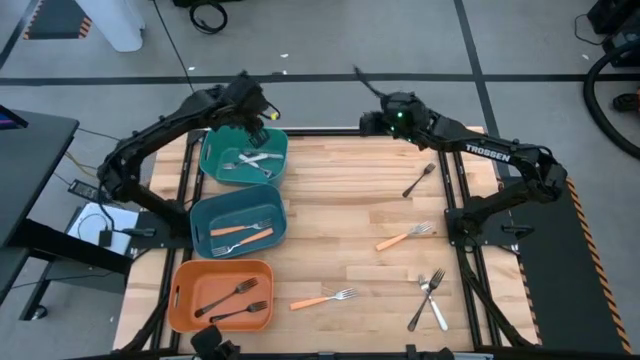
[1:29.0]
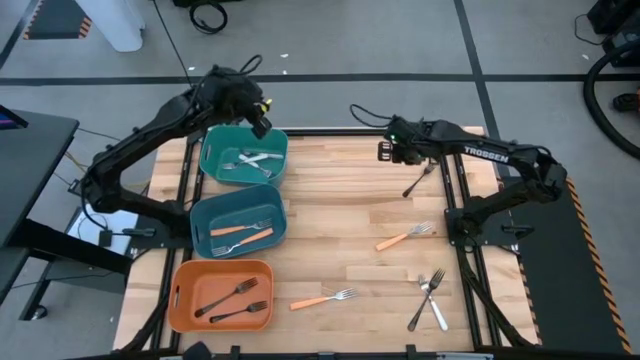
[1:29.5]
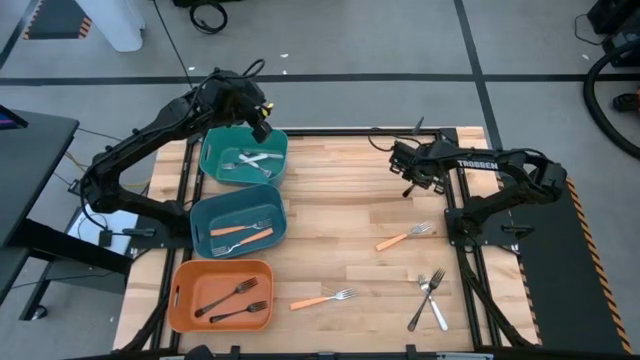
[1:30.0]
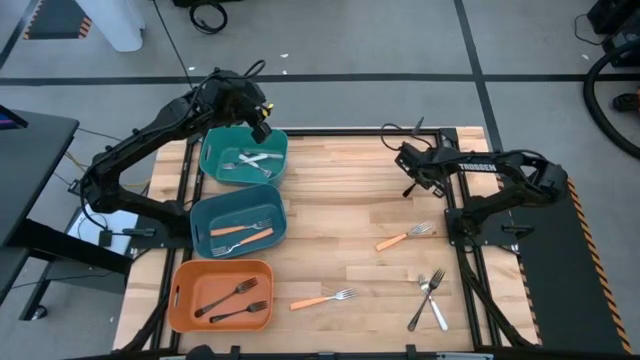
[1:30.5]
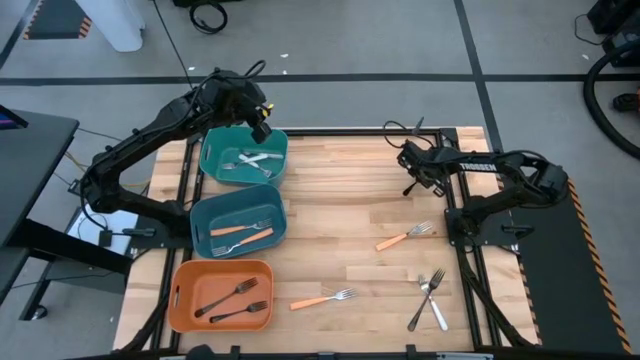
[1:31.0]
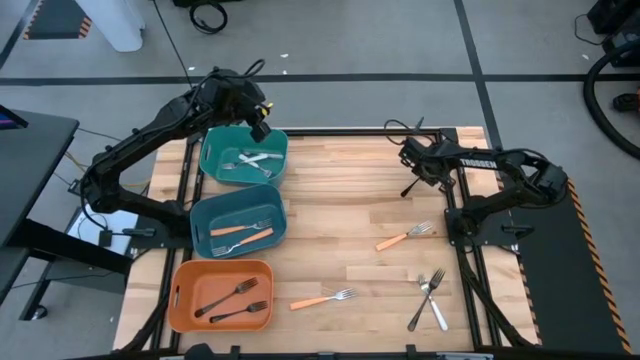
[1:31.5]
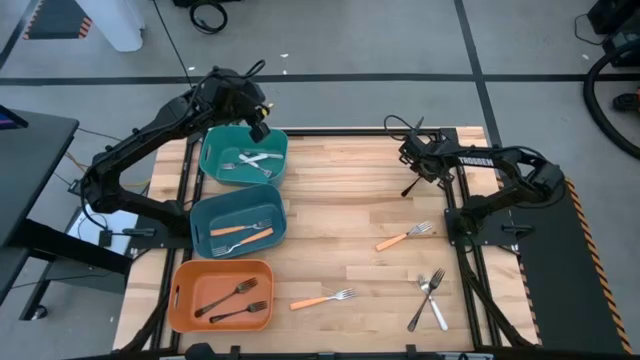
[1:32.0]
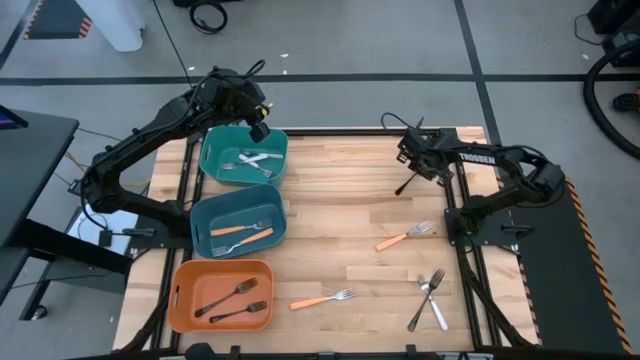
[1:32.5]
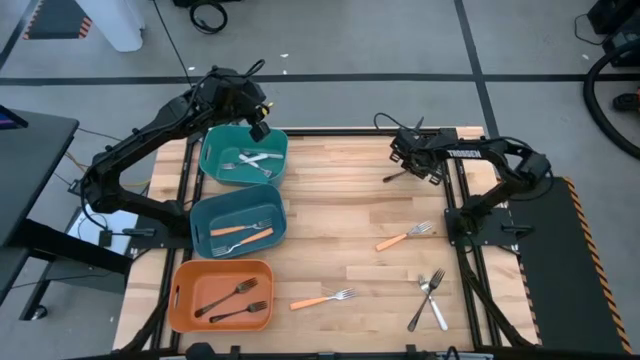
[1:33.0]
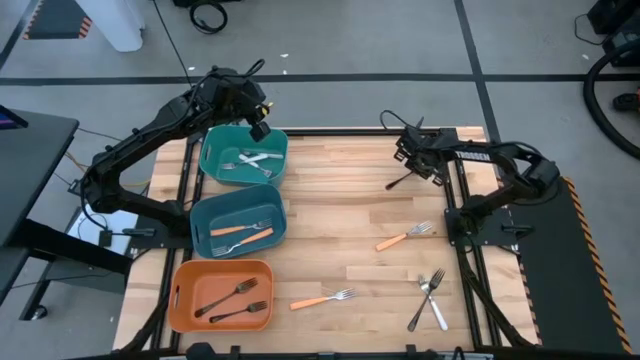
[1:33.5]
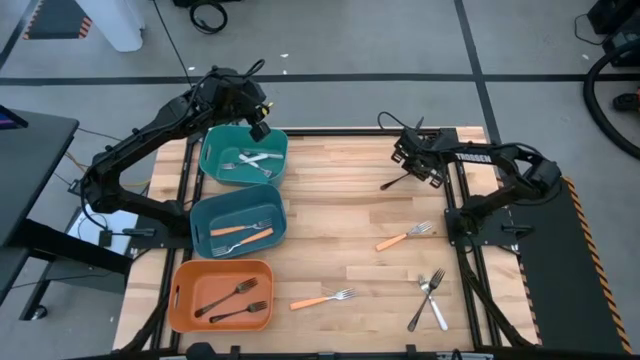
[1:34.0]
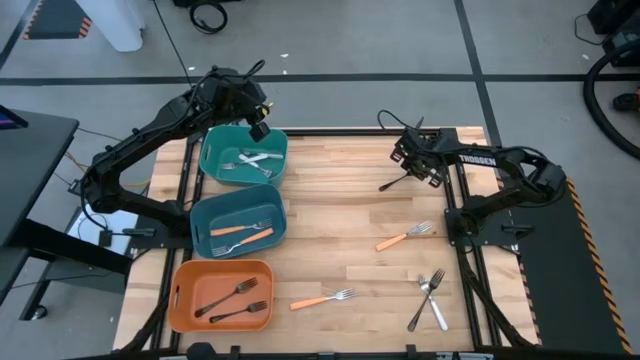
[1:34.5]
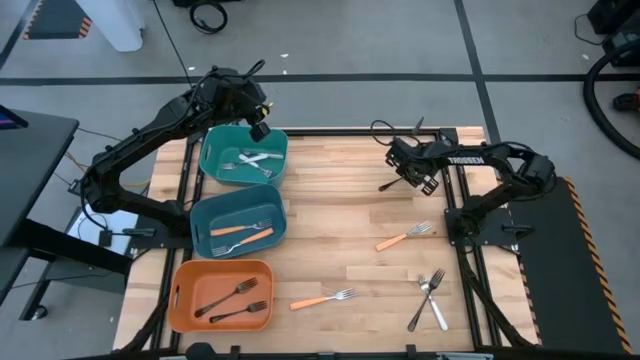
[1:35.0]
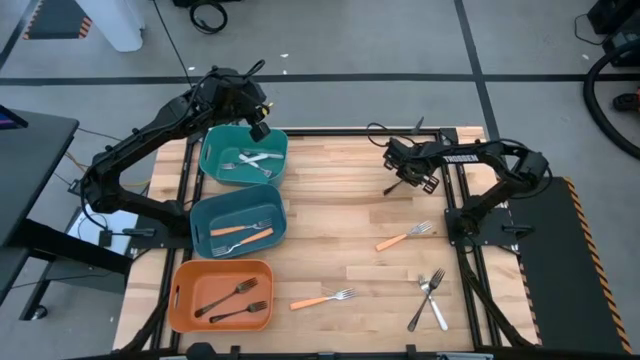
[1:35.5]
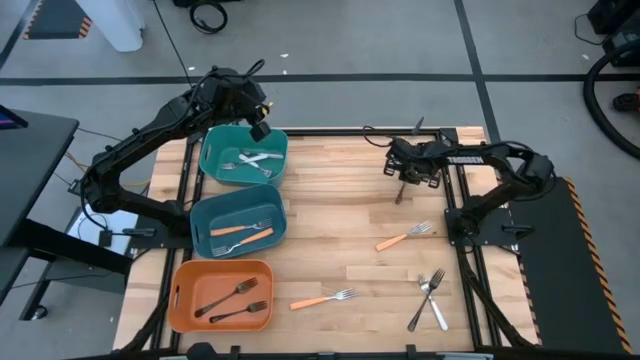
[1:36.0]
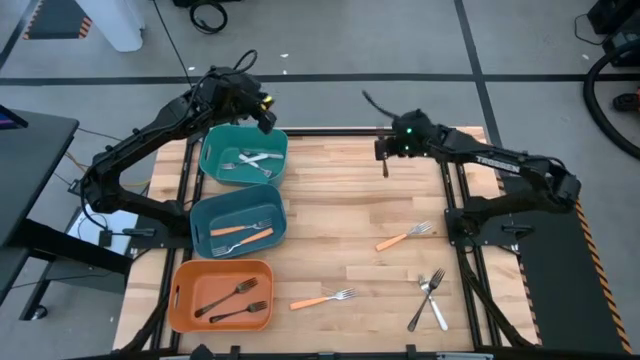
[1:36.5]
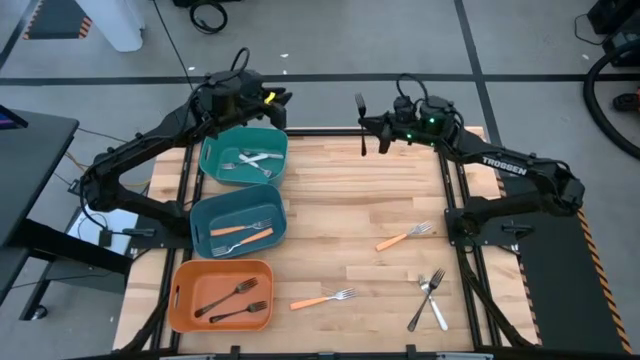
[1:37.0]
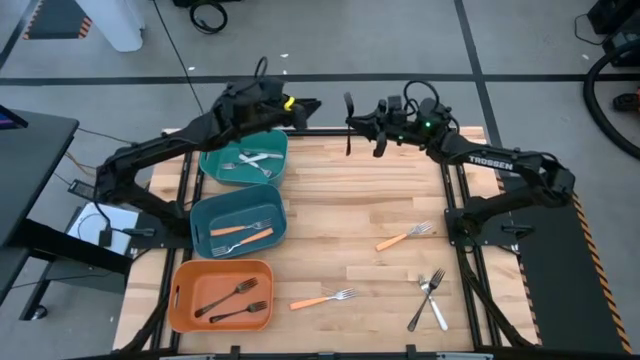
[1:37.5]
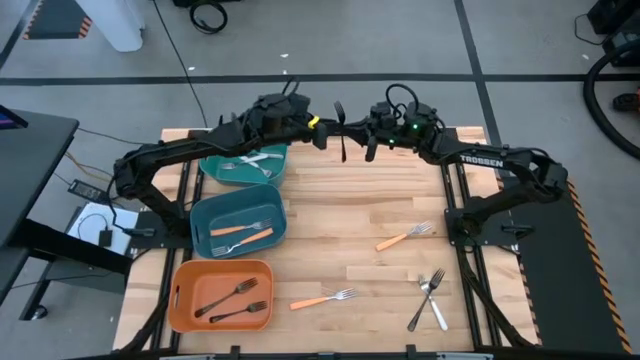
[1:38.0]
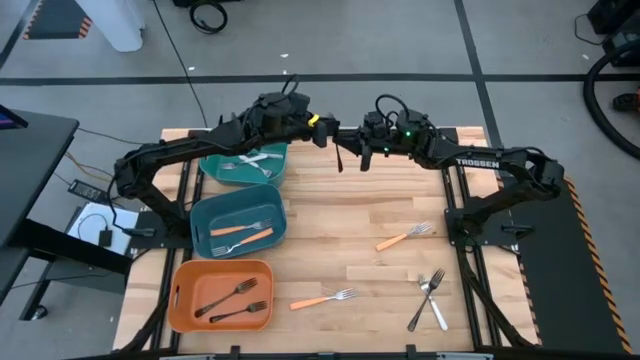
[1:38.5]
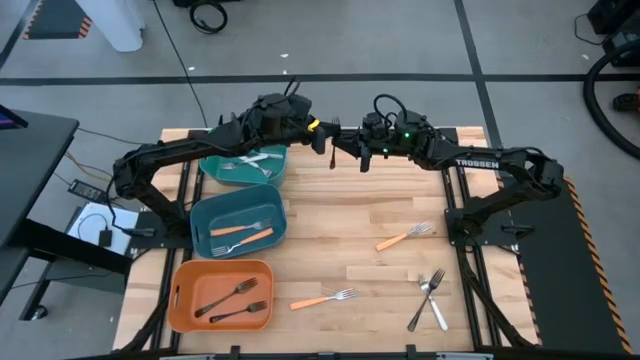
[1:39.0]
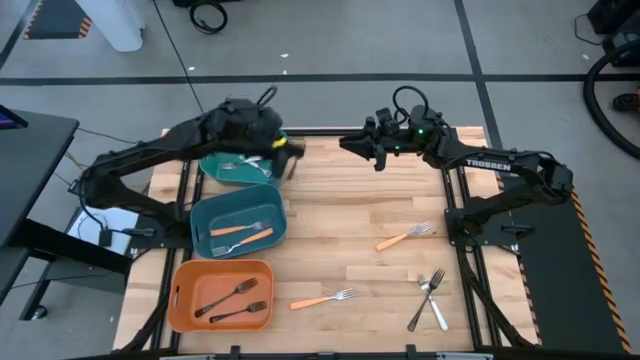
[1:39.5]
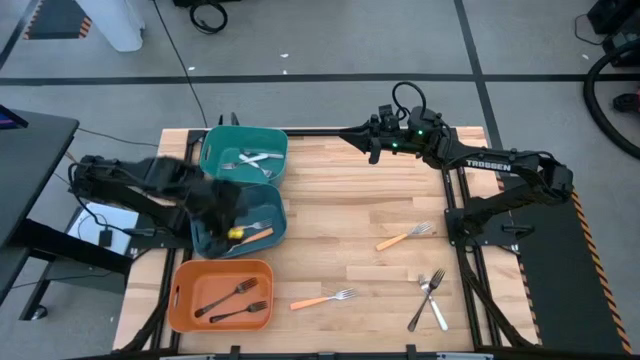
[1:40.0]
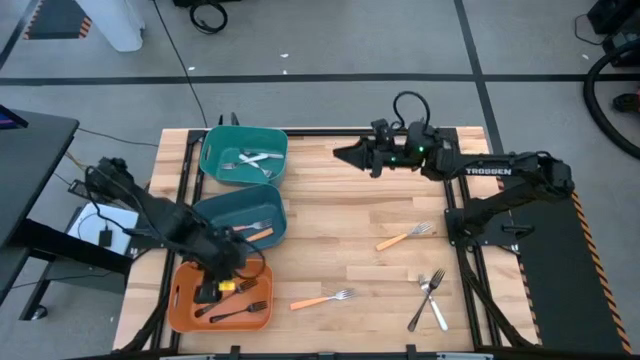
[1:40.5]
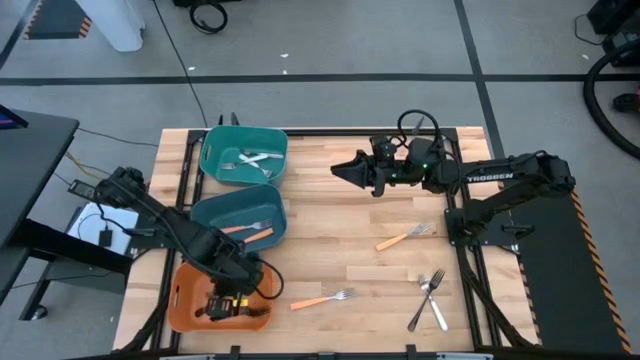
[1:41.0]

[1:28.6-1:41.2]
Task: Sort silverware by color (type)
Put the black fork into the orange bin

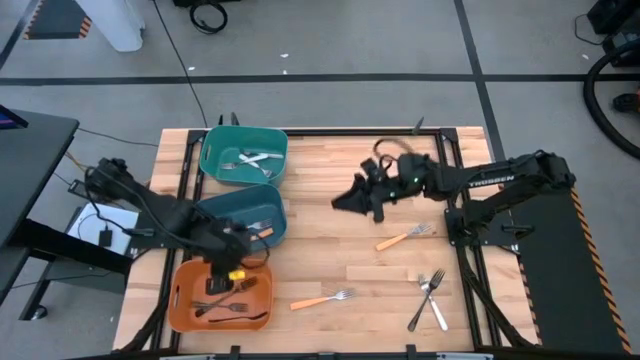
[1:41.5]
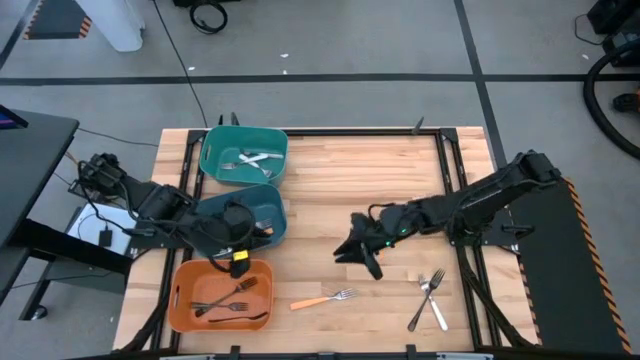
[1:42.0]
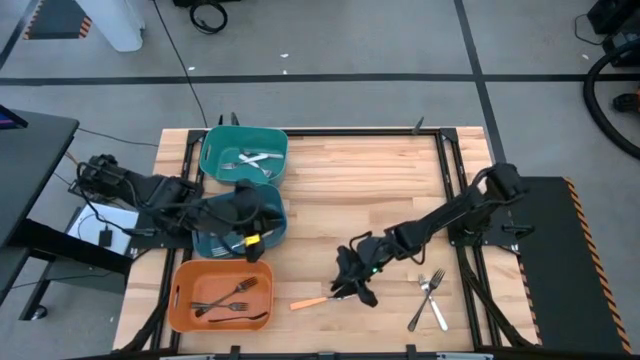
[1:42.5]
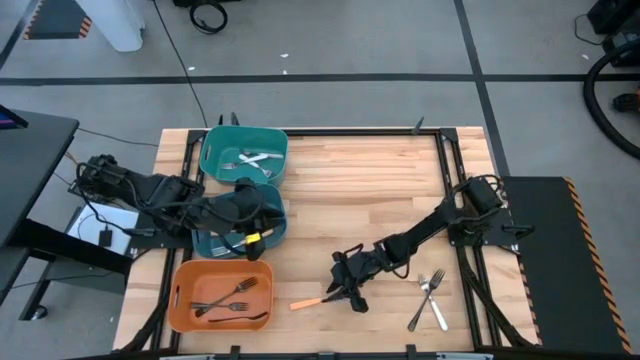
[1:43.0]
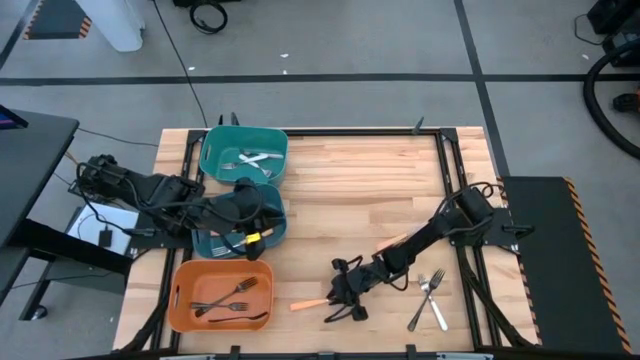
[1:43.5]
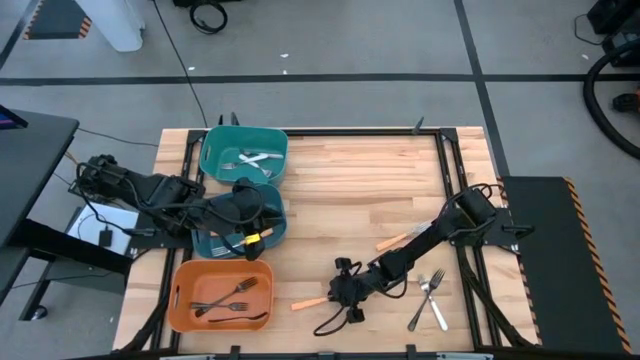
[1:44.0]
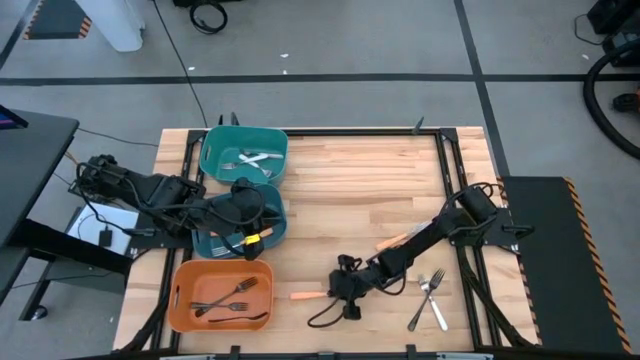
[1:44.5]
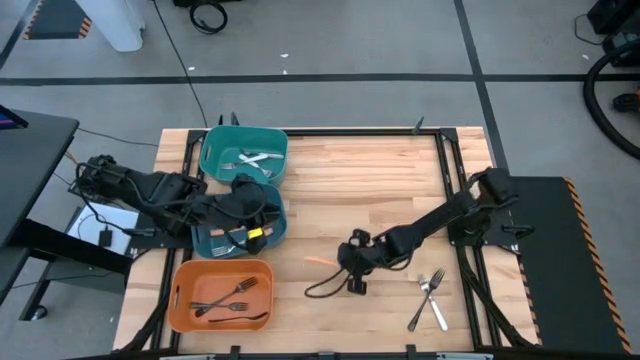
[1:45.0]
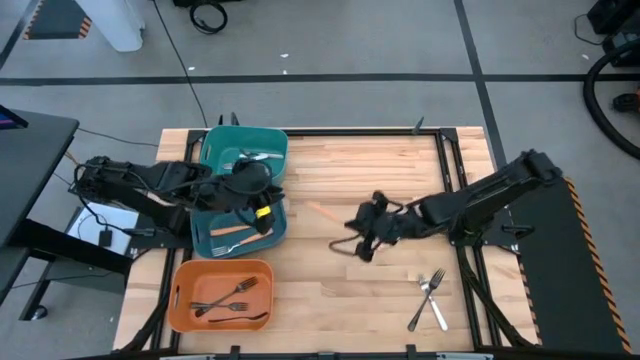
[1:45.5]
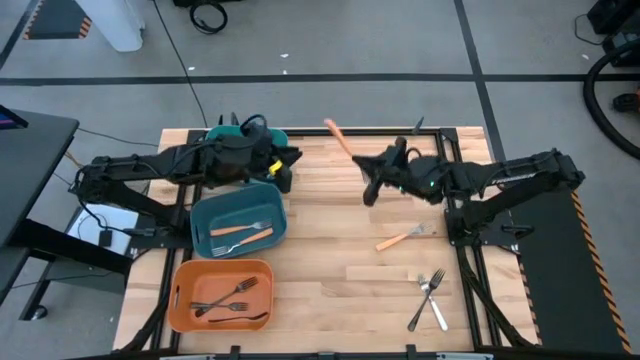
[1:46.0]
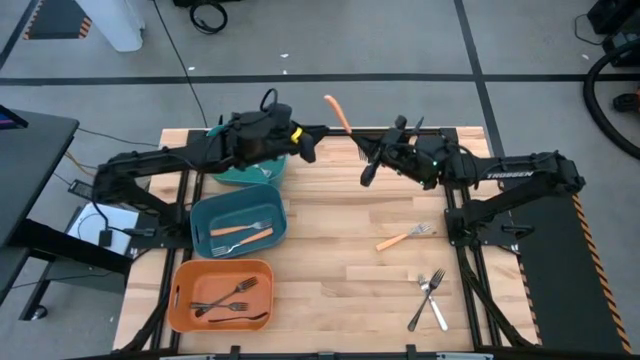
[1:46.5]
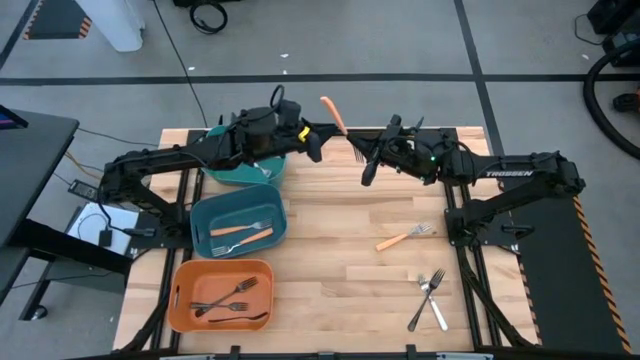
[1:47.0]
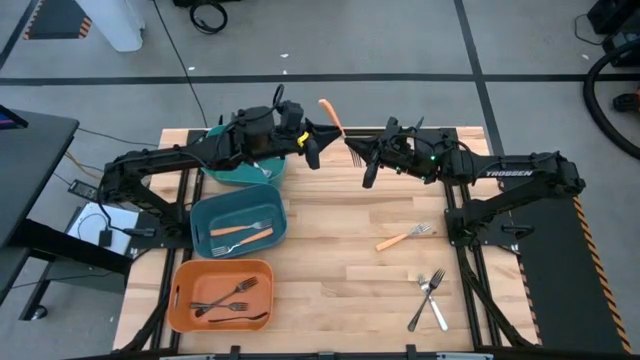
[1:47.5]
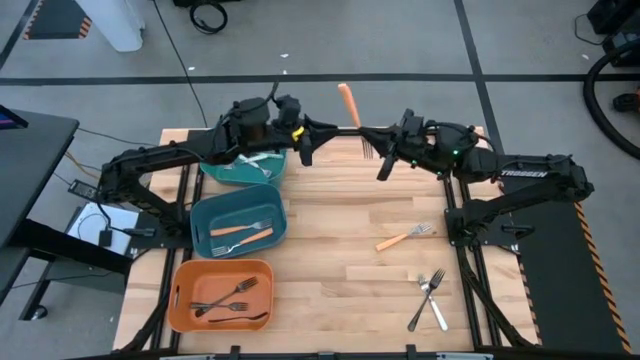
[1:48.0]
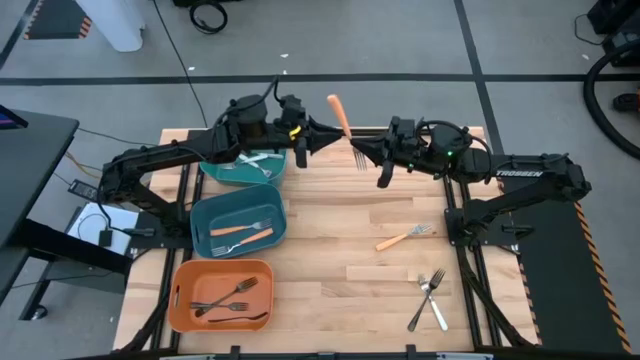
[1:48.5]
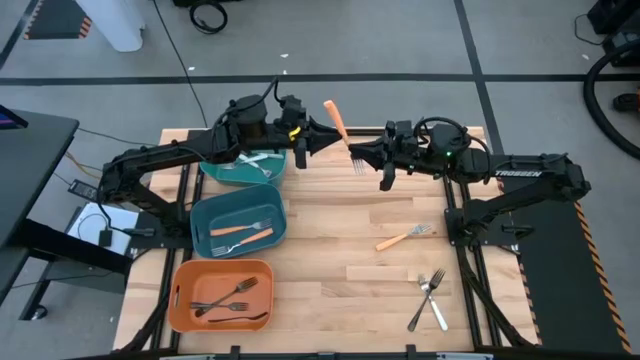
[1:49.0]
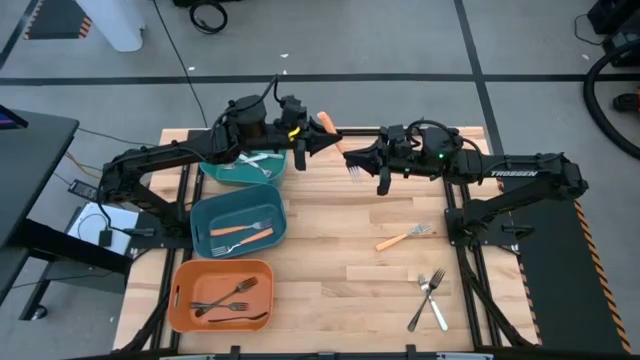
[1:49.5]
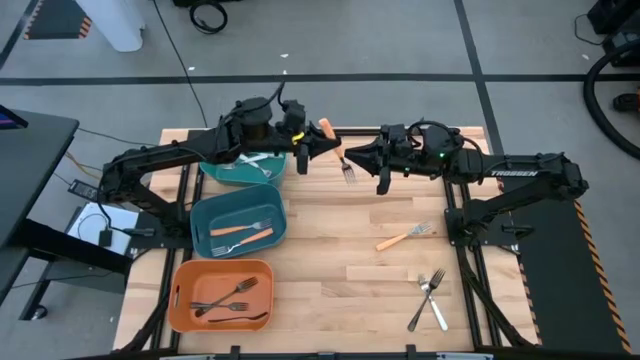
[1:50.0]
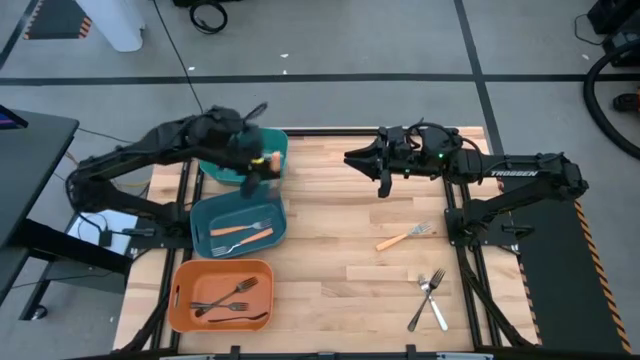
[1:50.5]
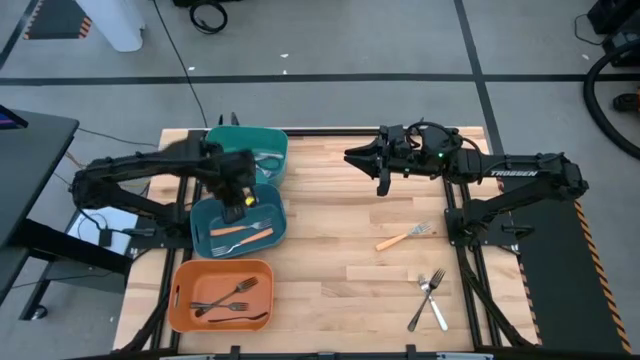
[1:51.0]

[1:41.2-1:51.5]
Put the orange fork into the blue bin
